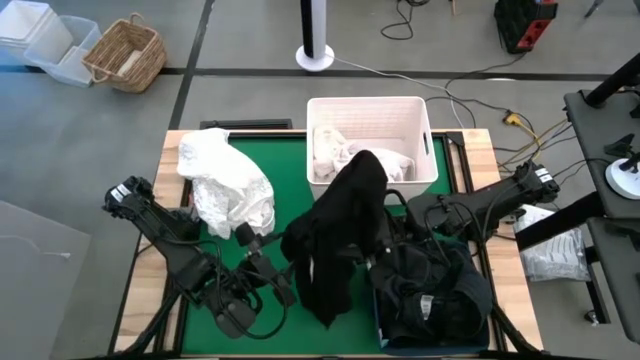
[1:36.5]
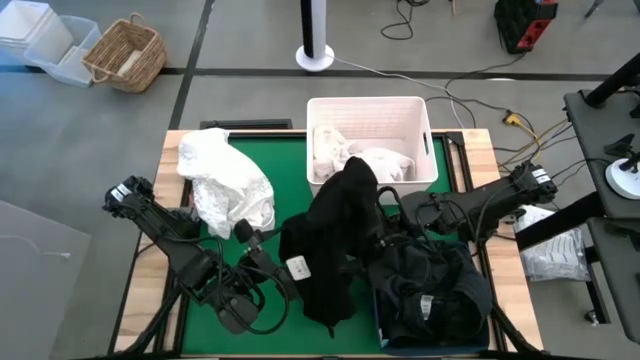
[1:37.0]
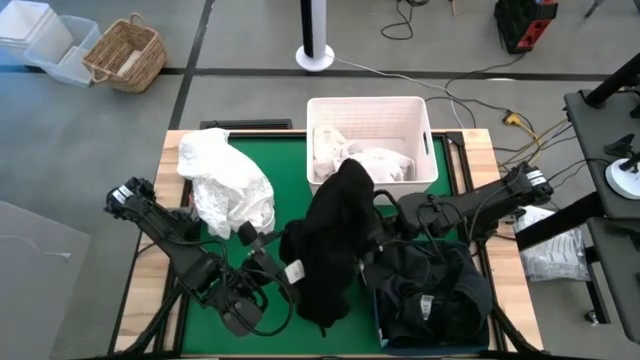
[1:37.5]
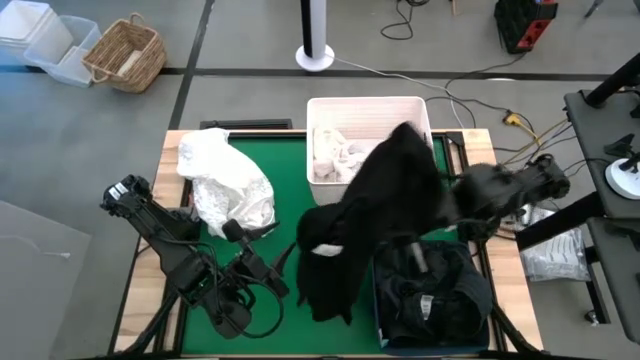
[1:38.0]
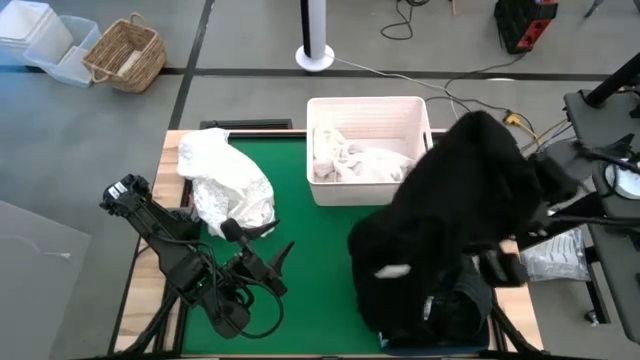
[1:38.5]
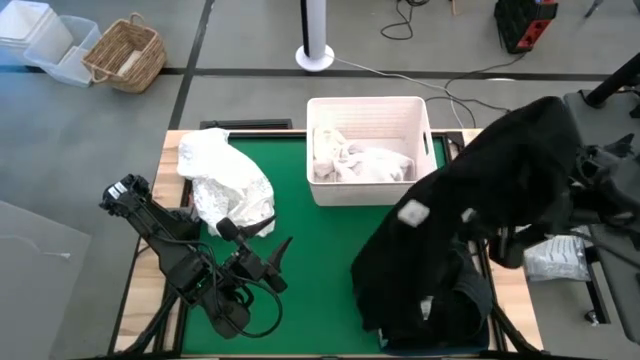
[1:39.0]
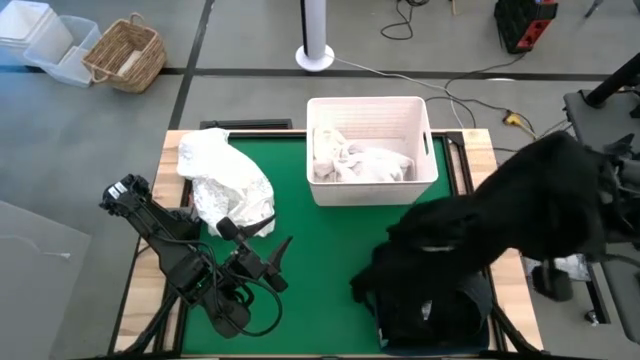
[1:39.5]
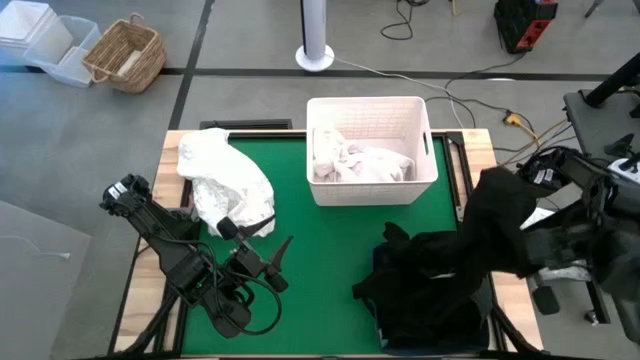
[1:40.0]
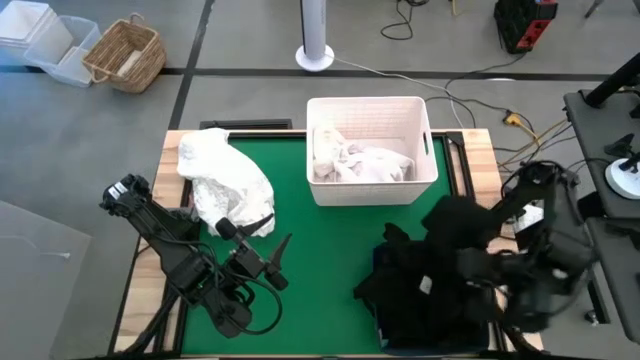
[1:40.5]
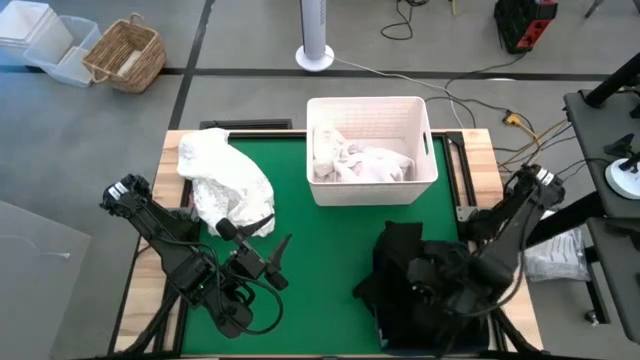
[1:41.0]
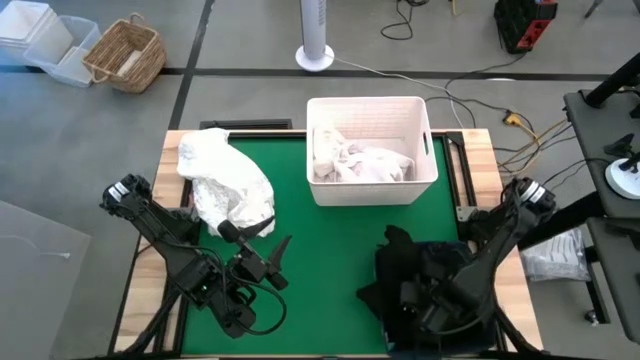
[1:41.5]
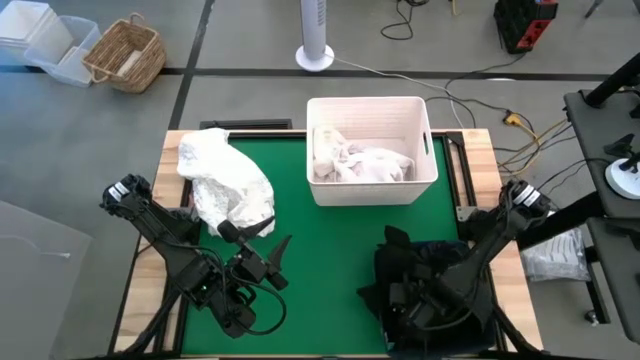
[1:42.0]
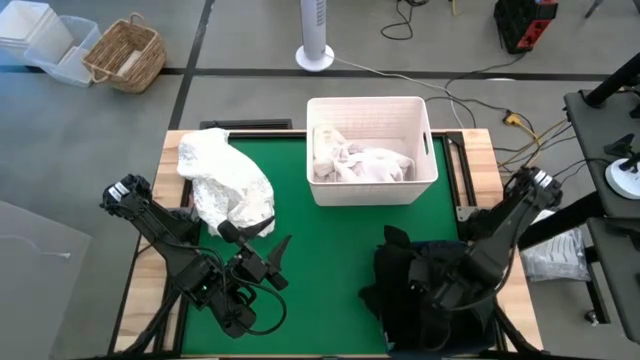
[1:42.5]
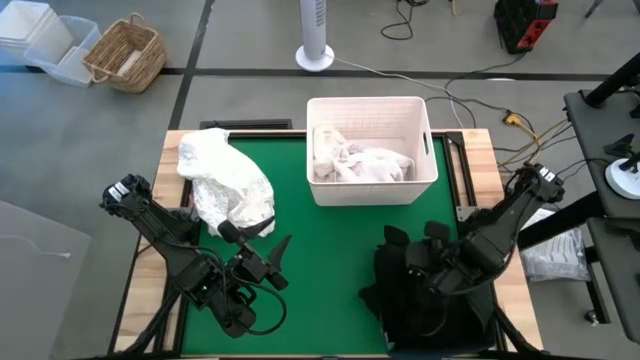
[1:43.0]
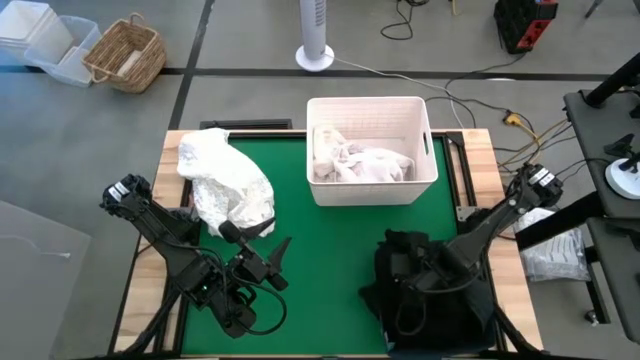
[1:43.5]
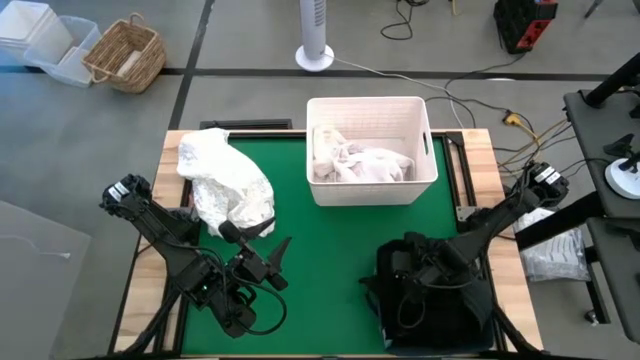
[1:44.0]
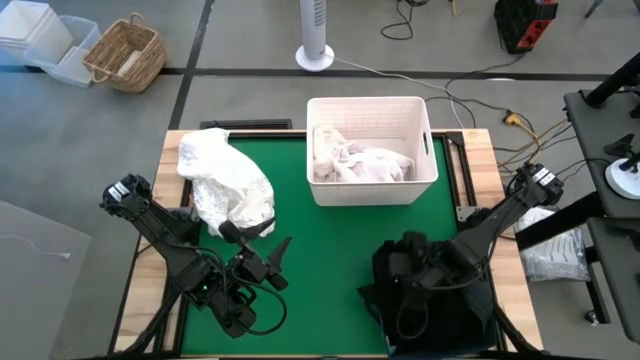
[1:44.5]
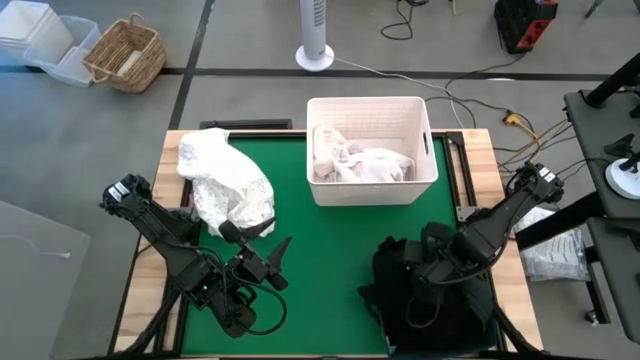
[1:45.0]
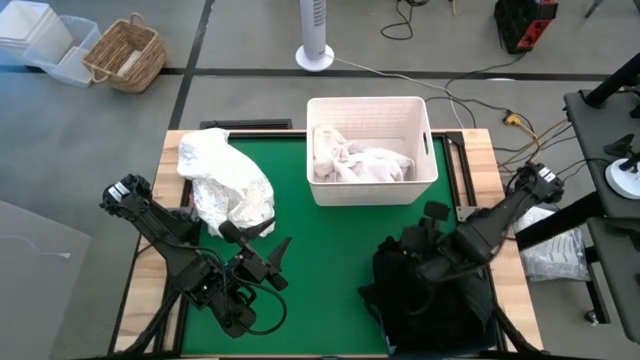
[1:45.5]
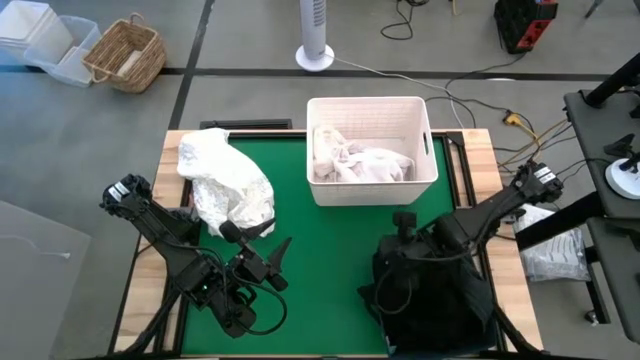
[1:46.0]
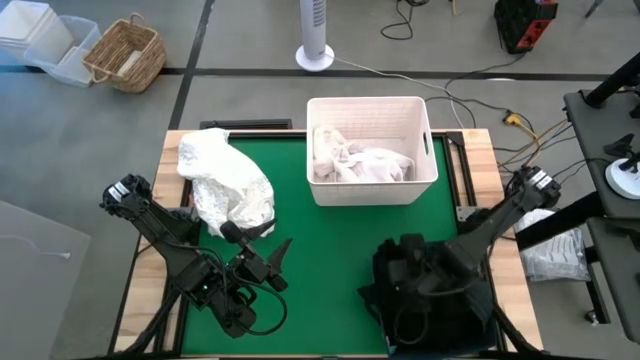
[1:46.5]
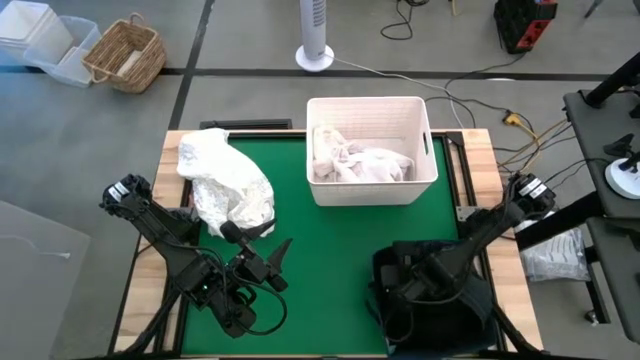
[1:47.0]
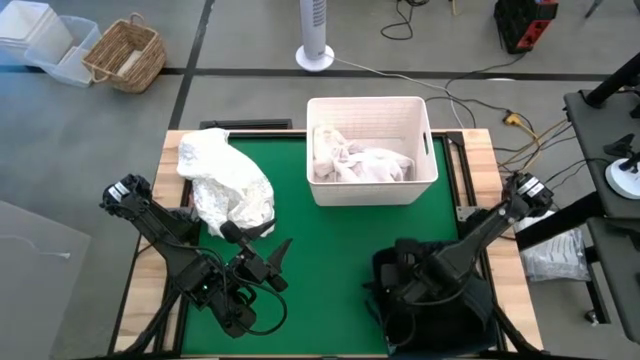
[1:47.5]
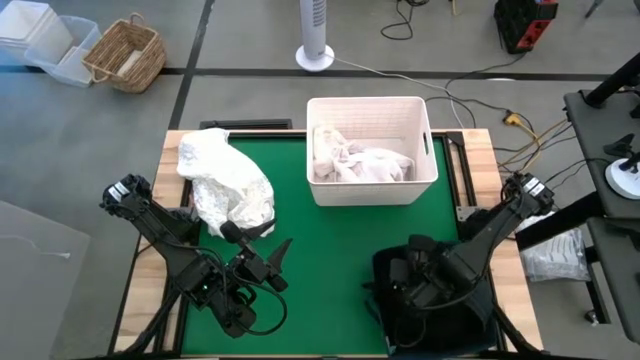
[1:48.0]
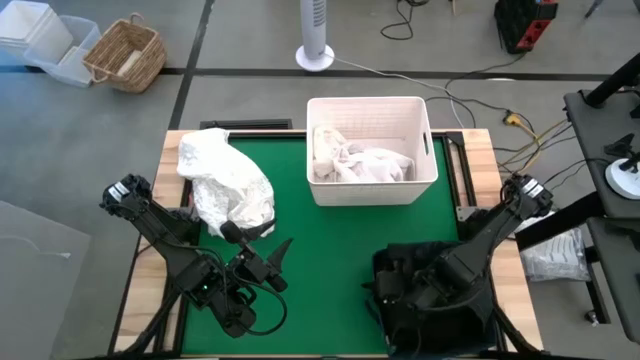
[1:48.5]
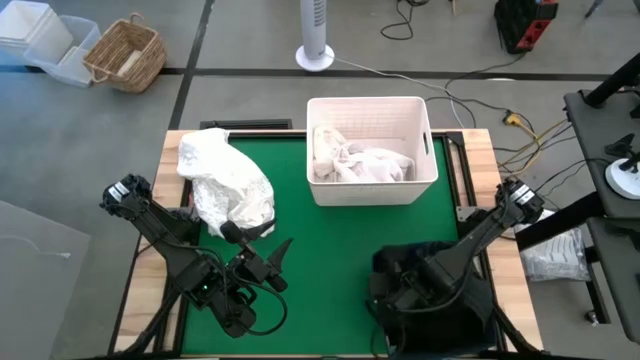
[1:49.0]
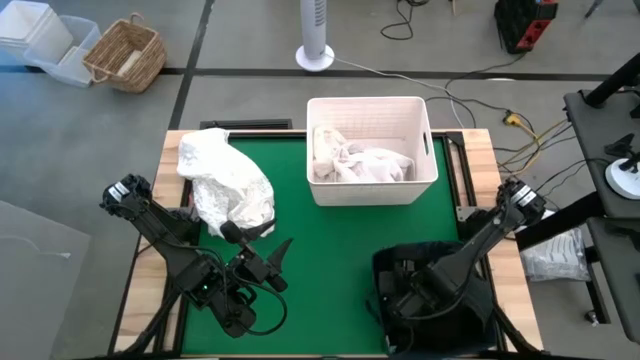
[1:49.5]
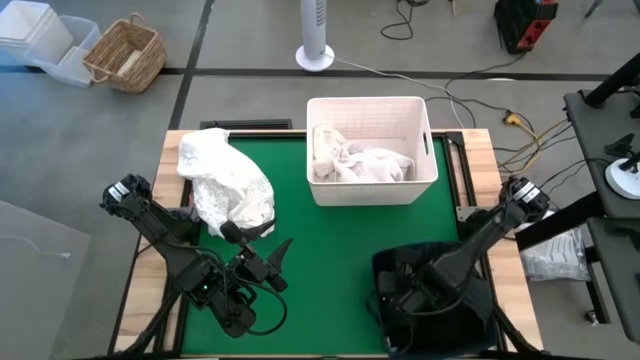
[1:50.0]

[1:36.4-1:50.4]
Put the black shirt into the blue laundry bin

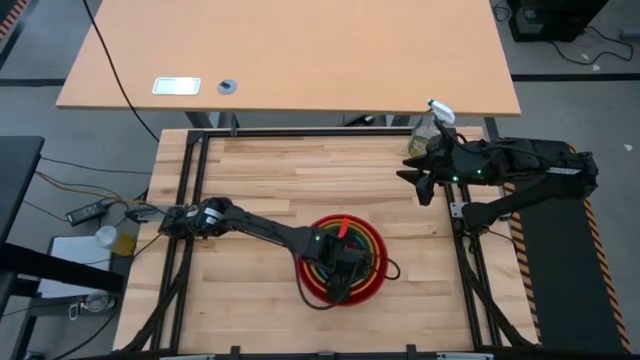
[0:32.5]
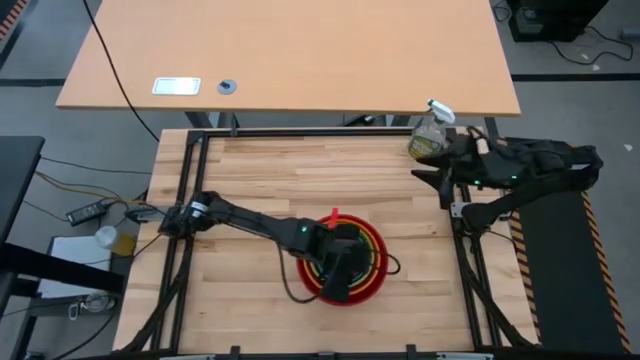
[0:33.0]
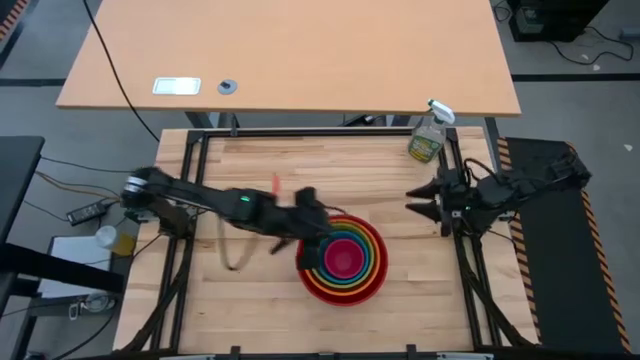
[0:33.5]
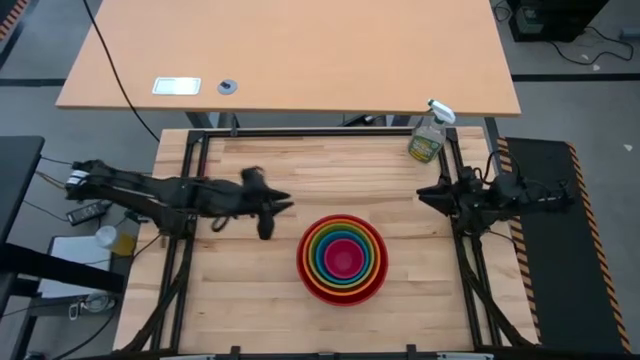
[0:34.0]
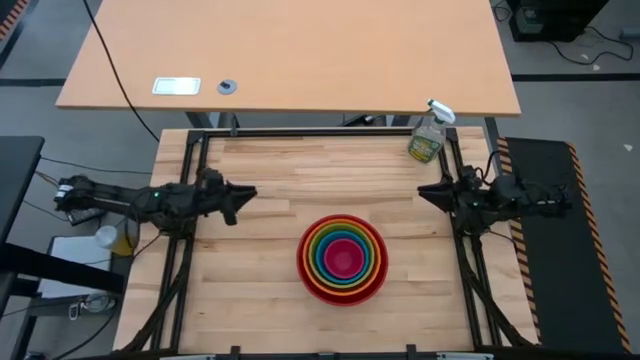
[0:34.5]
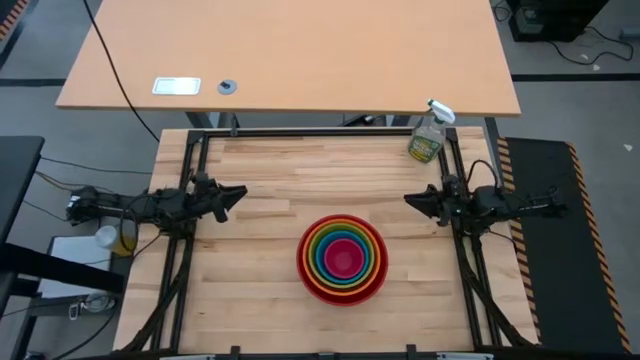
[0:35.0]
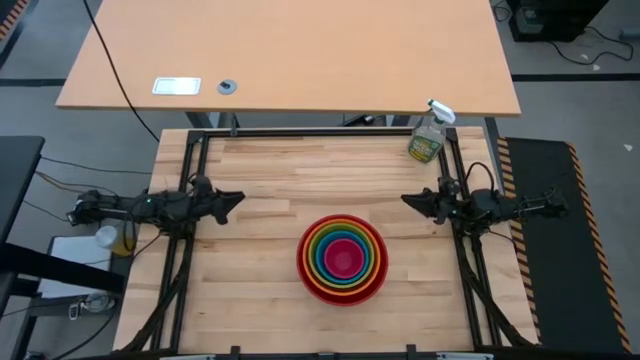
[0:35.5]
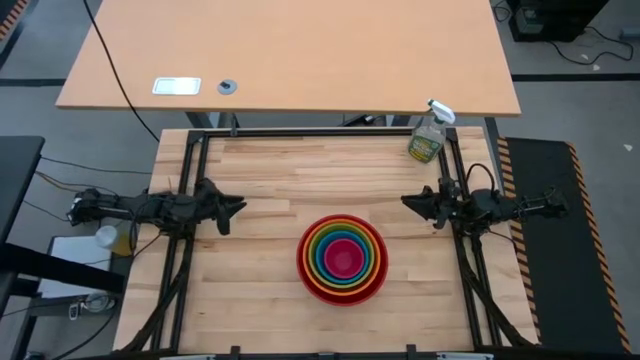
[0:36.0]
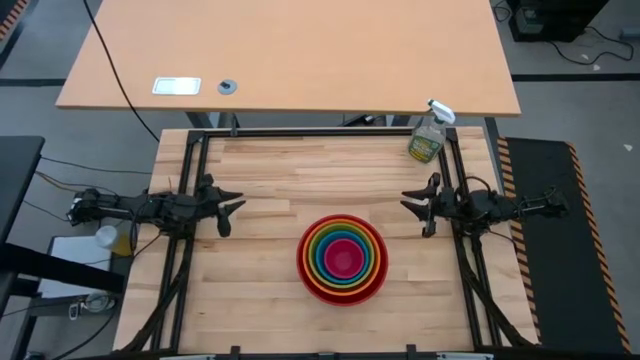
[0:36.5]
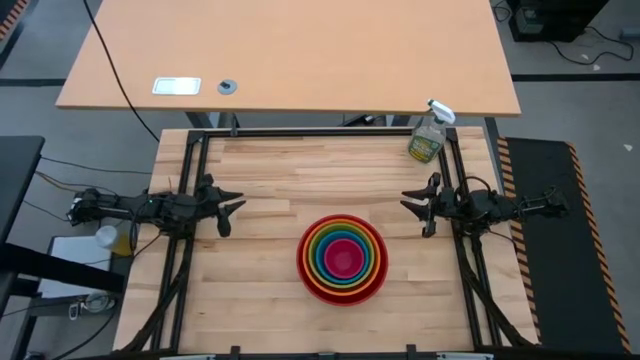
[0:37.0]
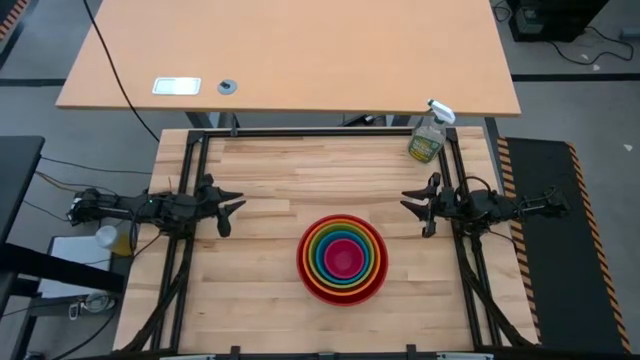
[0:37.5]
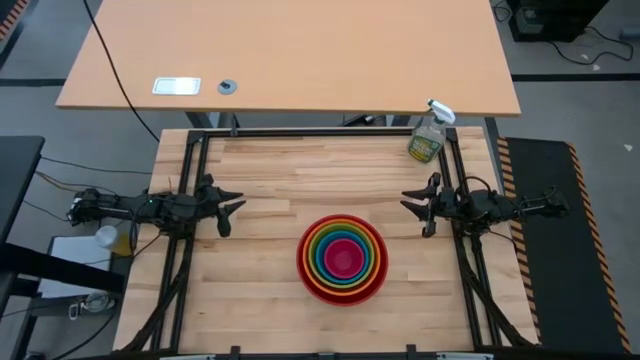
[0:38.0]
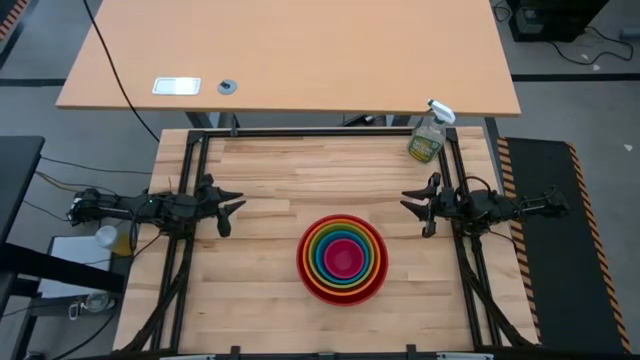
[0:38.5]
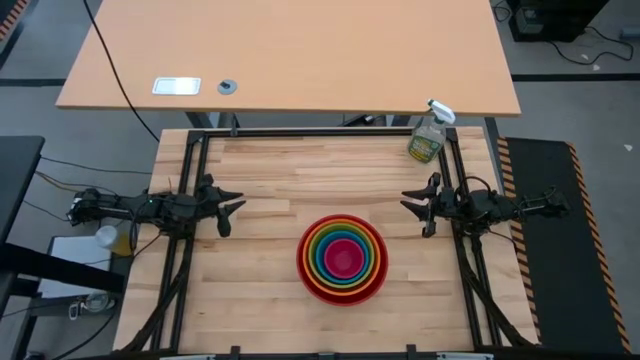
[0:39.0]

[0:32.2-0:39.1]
Return to Home Position
